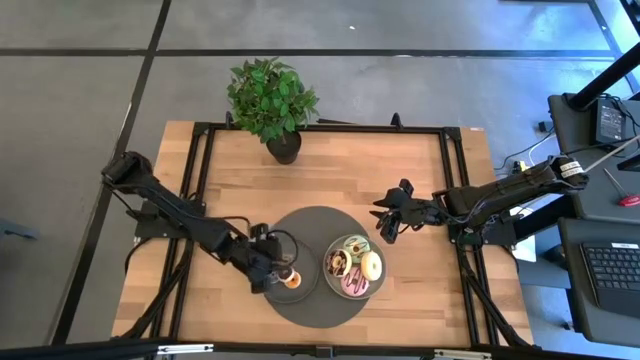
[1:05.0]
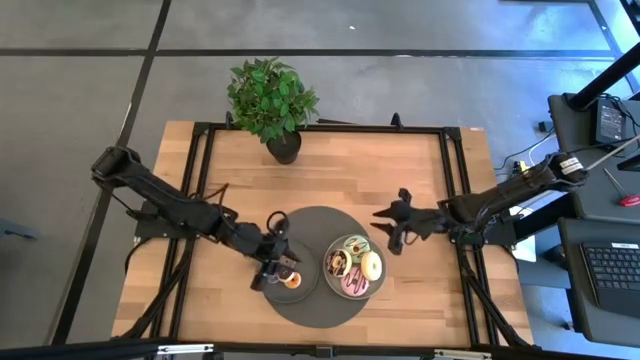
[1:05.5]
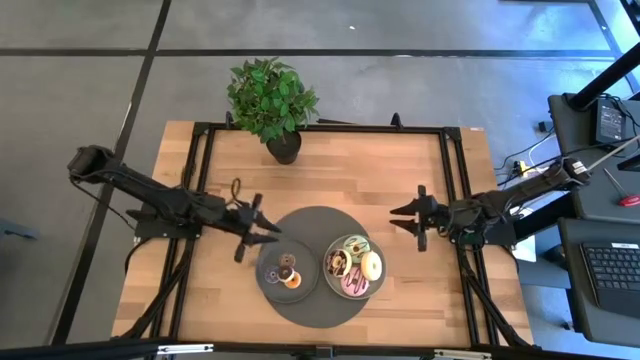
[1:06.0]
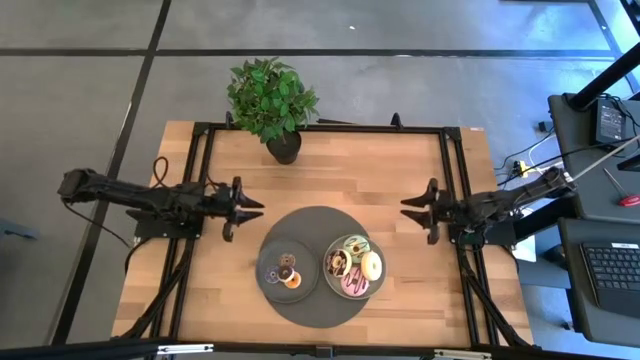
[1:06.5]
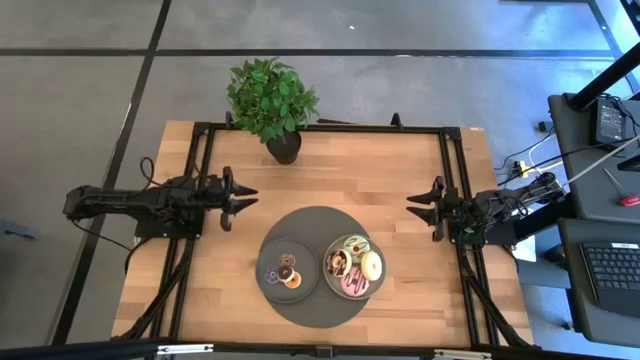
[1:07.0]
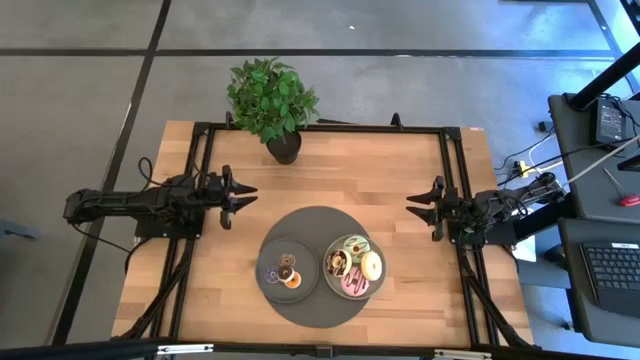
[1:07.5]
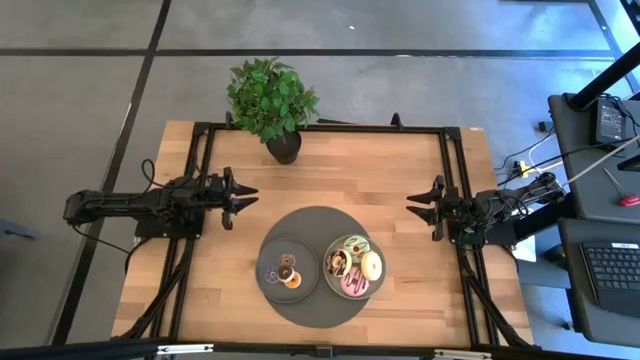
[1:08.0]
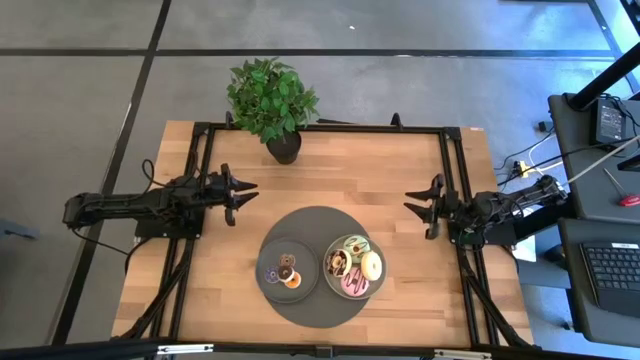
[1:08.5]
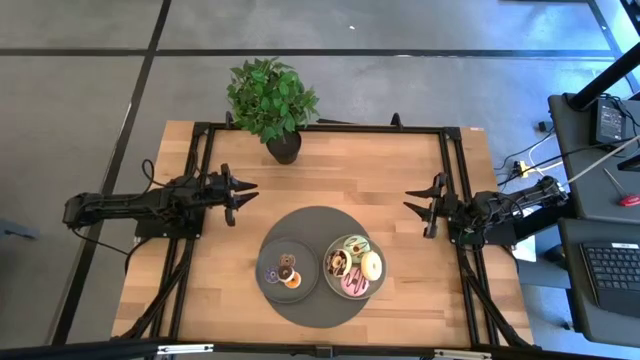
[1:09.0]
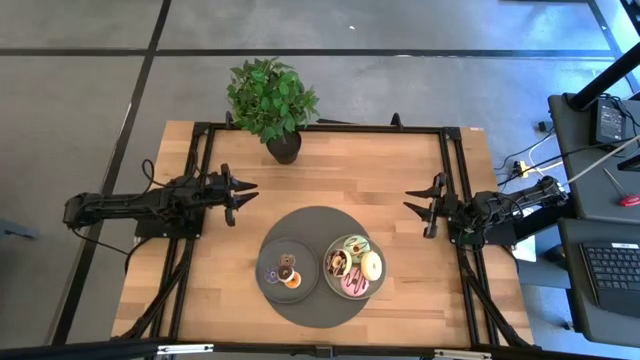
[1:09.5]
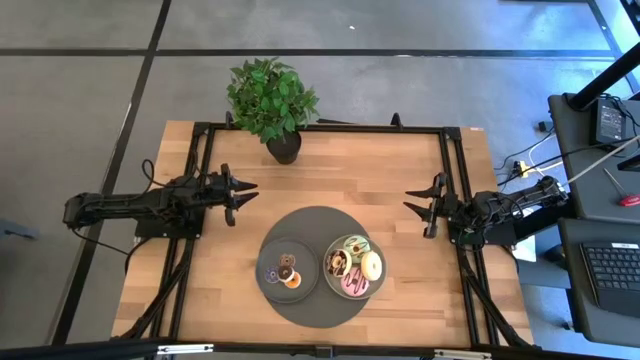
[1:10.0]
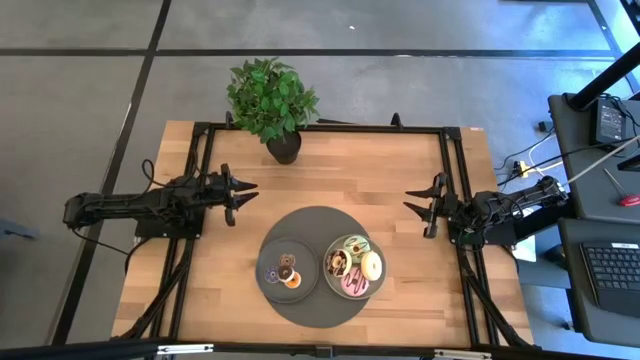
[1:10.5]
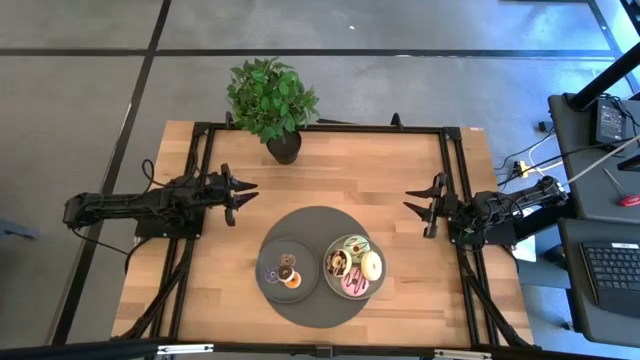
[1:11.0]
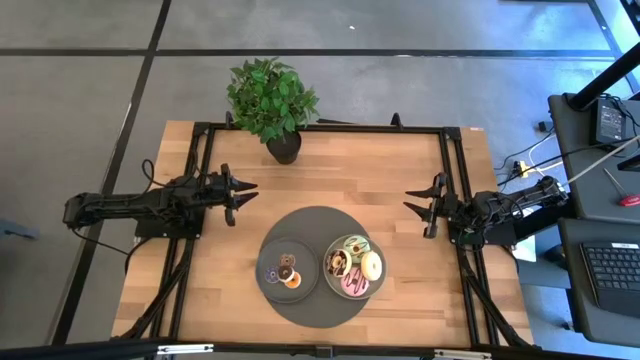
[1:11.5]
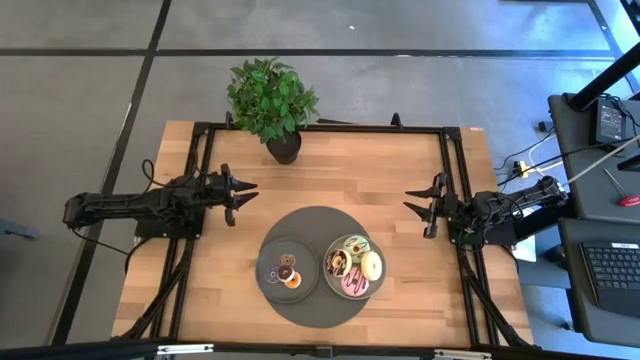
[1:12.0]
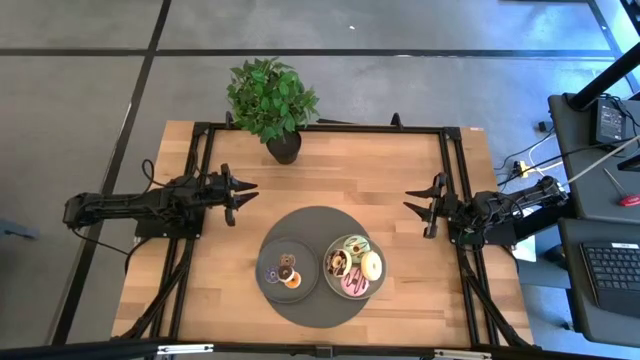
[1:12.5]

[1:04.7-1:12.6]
Task: Pick & Place donuts
Return to Home Position

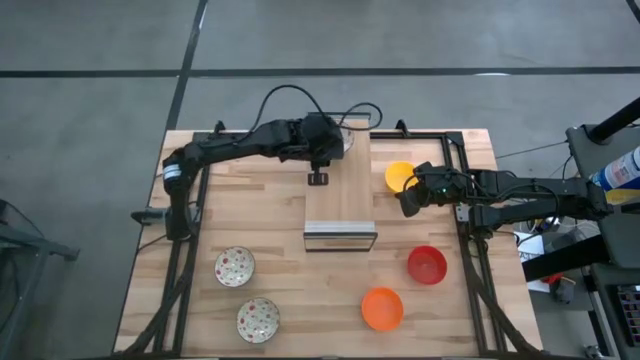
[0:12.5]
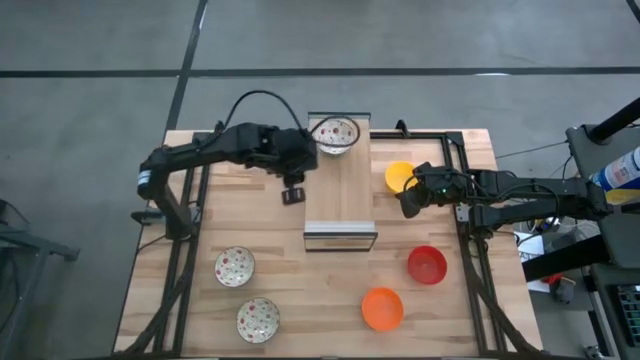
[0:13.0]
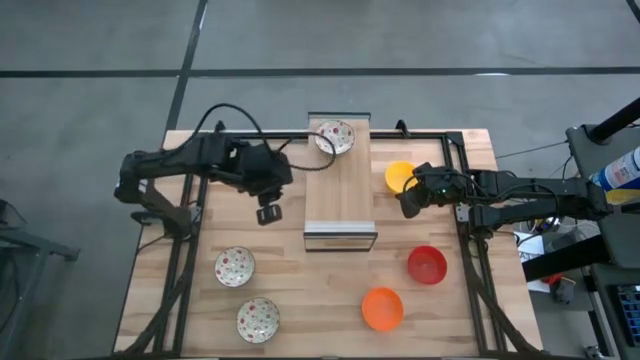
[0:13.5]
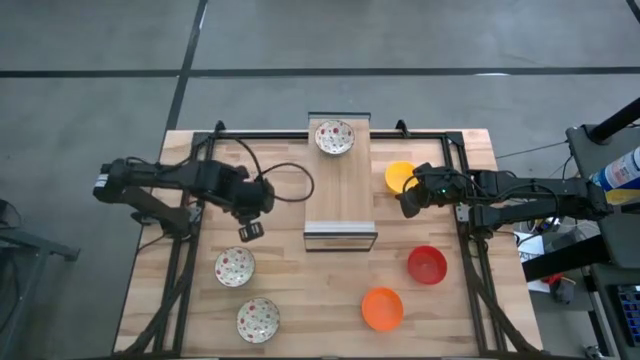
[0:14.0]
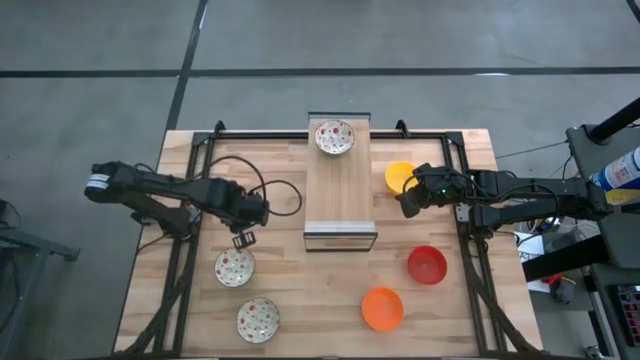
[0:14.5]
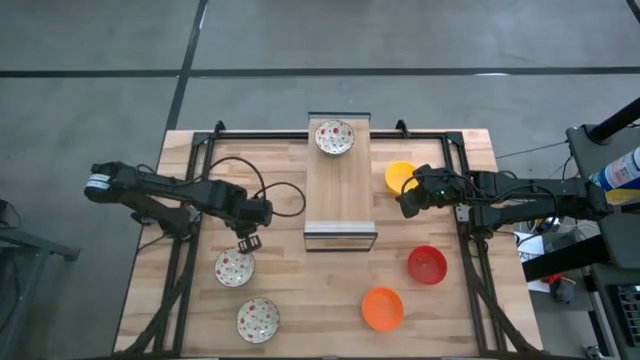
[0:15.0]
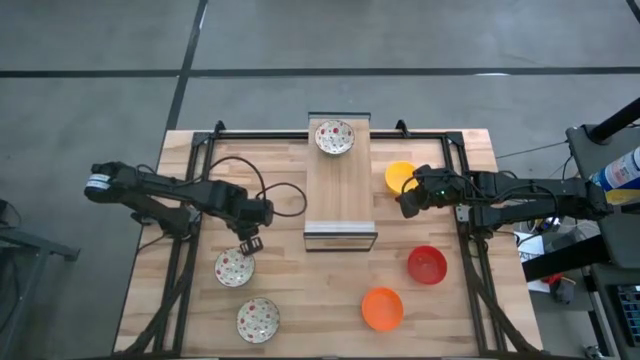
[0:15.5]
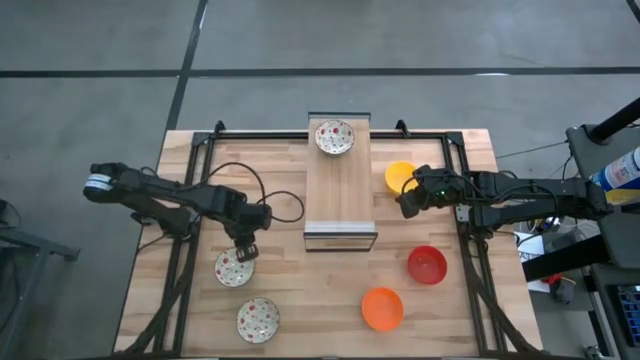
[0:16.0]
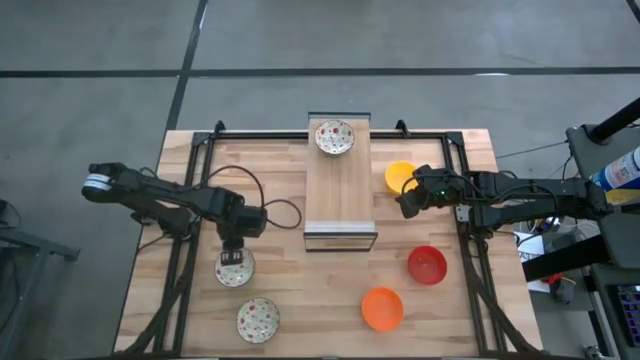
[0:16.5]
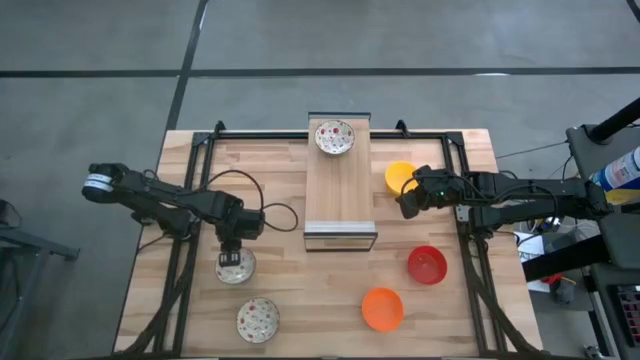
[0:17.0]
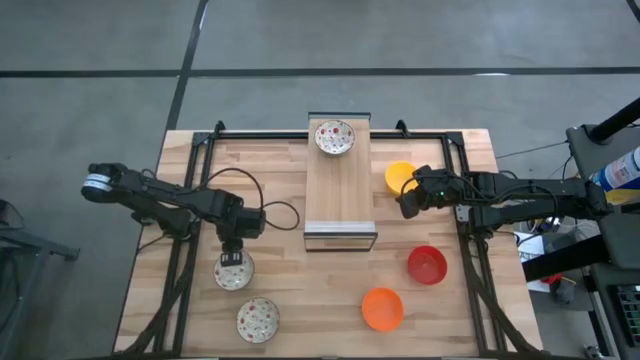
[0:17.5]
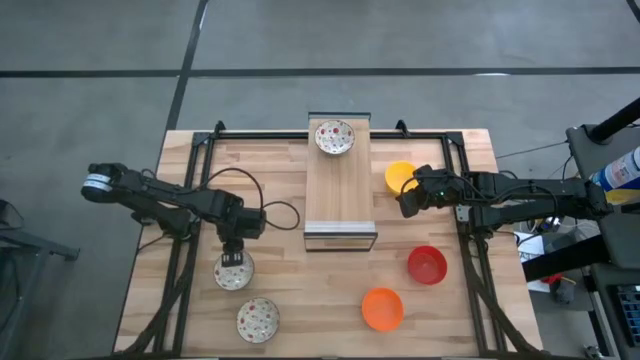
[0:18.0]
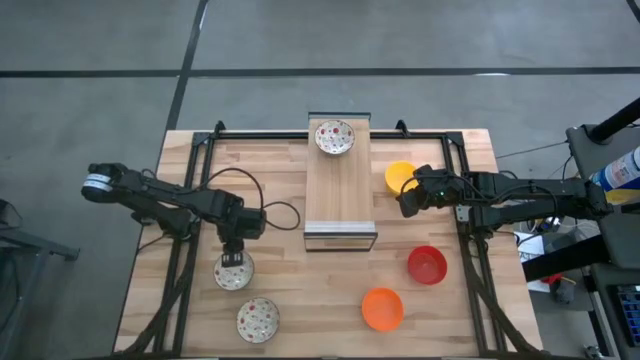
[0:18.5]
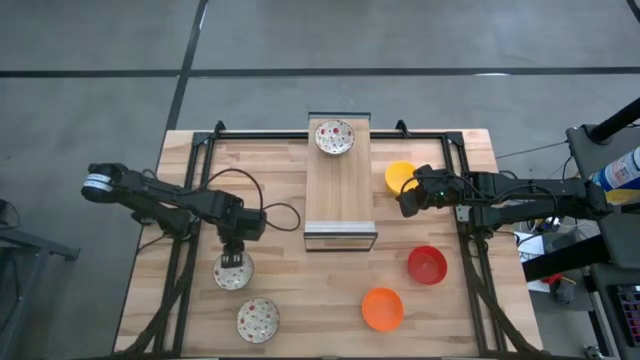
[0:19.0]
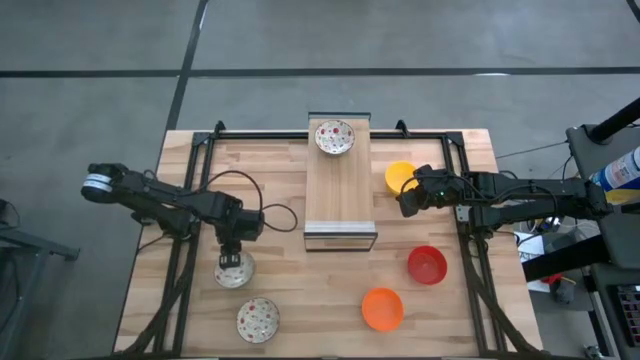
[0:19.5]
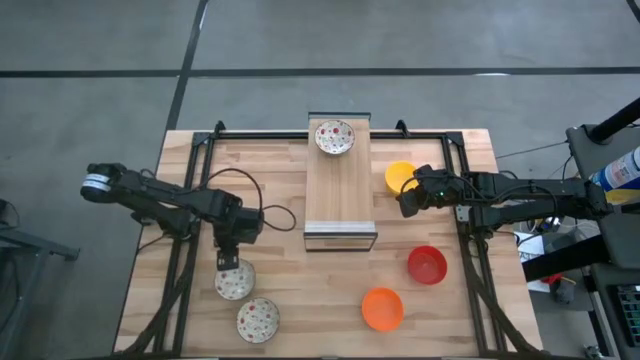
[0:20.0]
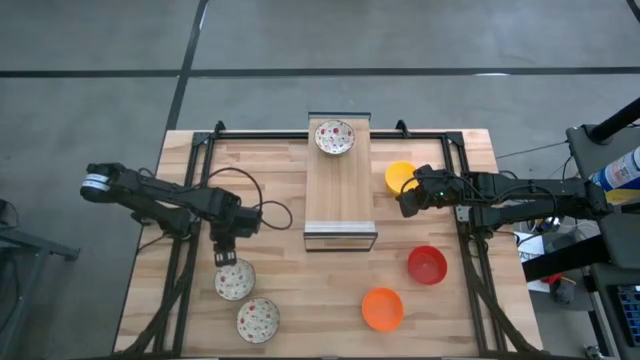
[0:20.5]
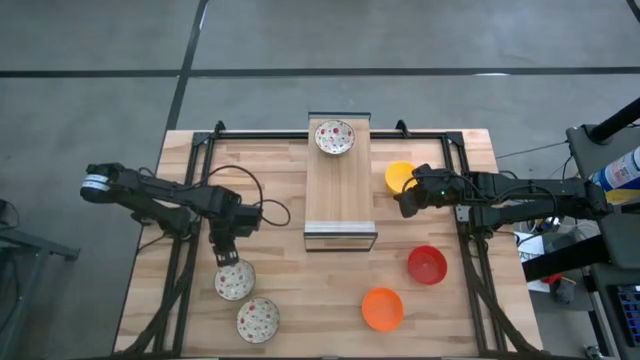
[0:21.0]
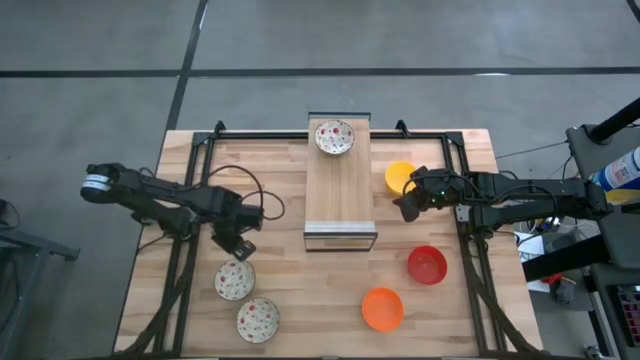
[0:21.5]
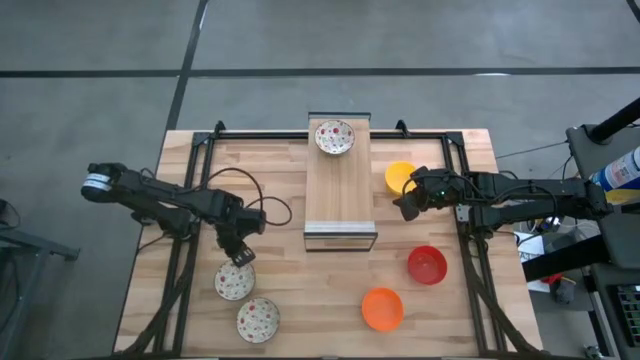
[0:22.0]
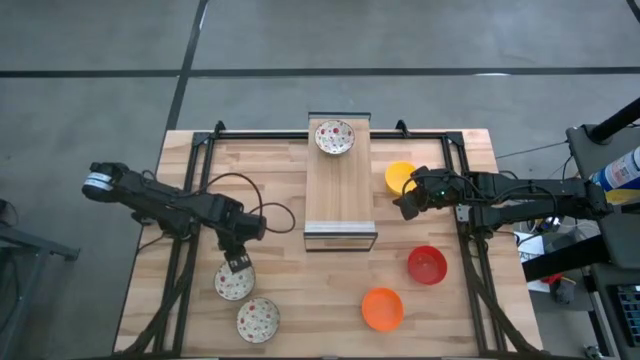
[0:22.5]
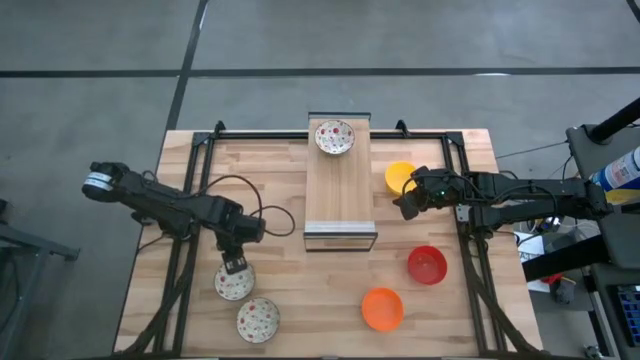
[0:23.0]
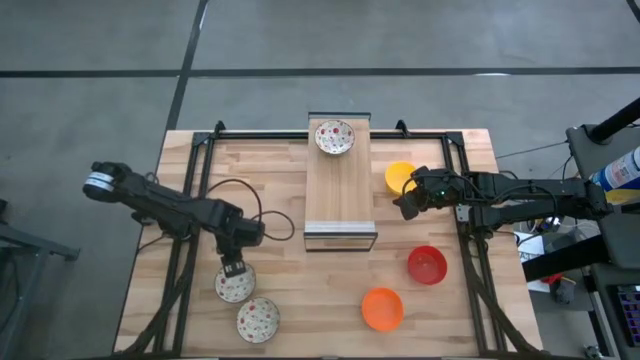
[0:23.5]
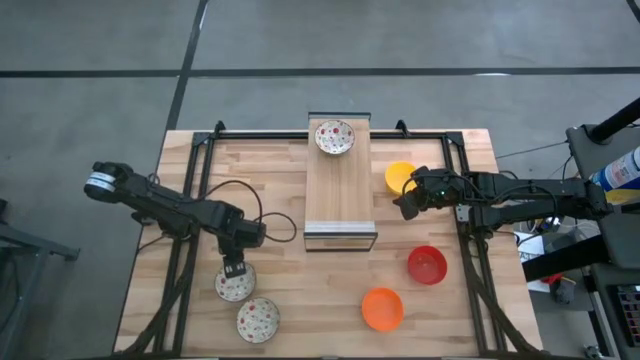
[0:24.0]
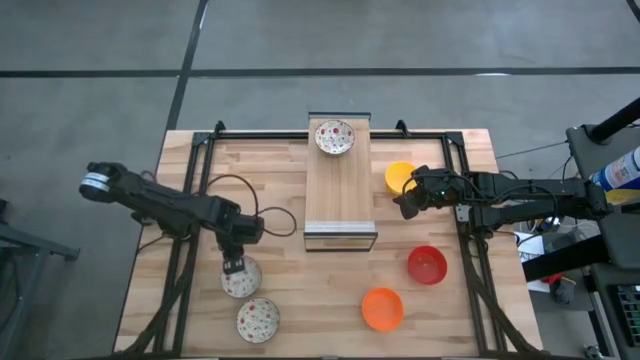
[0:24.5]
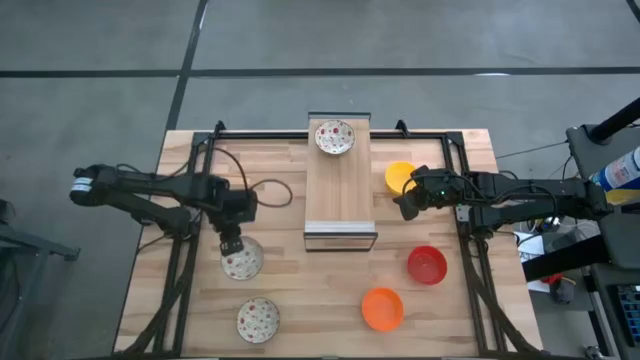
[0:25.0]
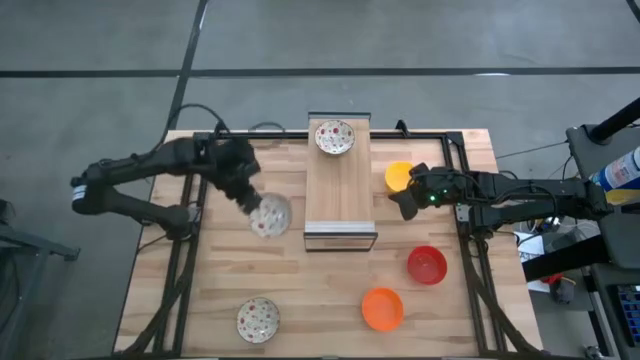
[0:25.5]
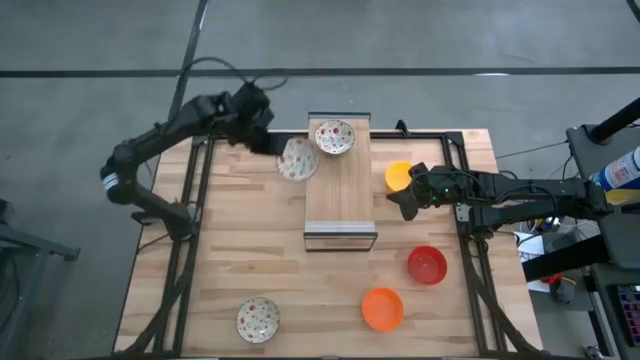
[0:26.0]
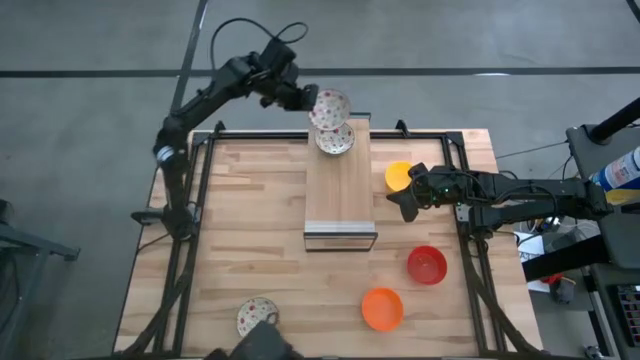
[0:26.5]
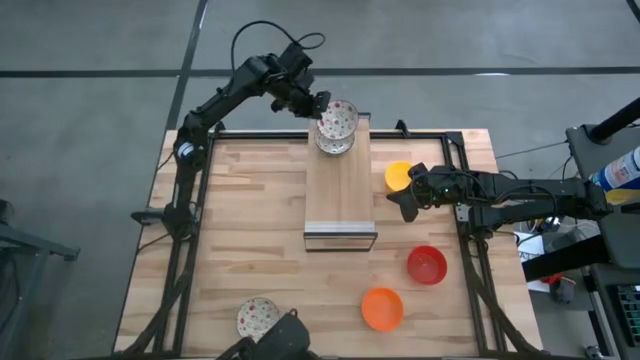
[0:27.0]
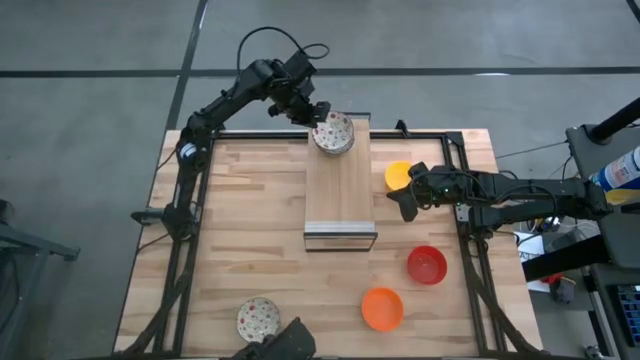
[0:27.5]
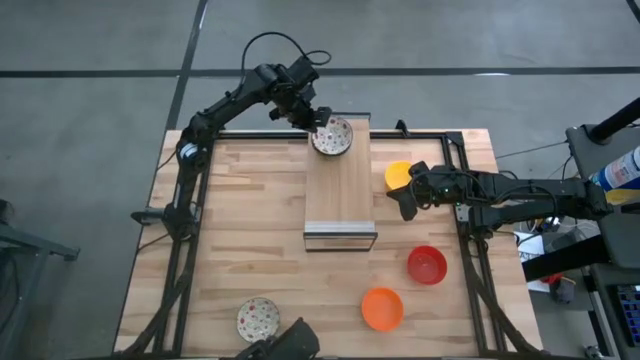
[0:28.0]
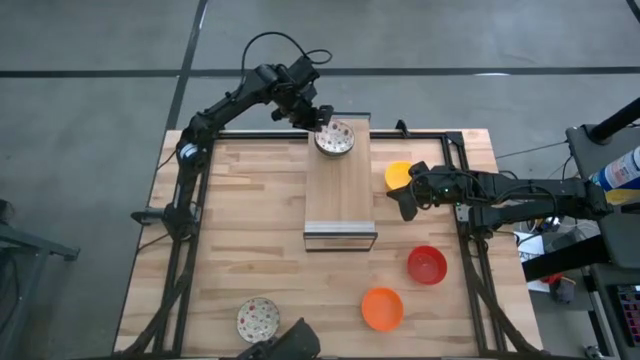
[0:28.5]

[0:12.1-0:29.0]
Task: Pick & Place Mini bowls
Stack the top white patterned bowl on top of the white patterned bowl on the shelf
